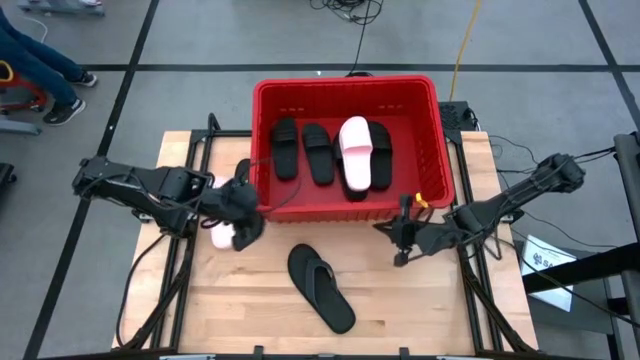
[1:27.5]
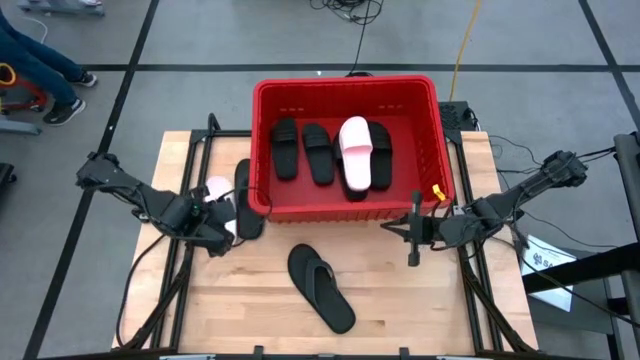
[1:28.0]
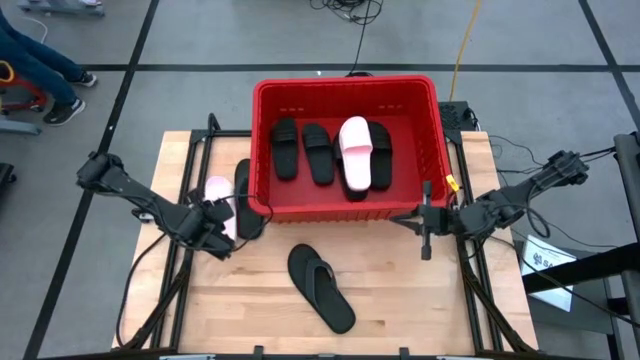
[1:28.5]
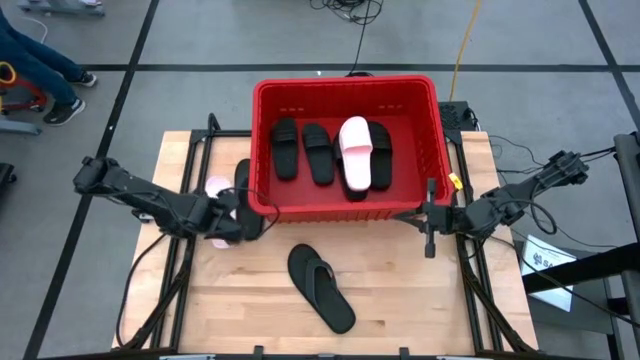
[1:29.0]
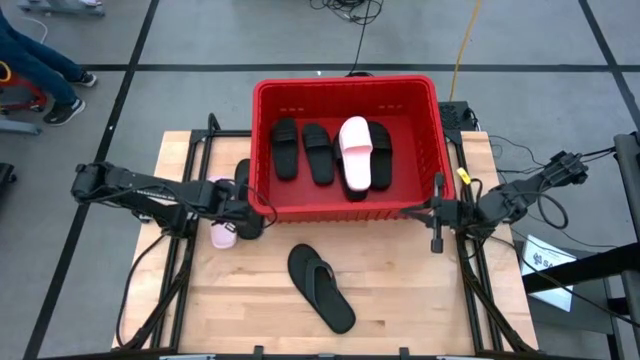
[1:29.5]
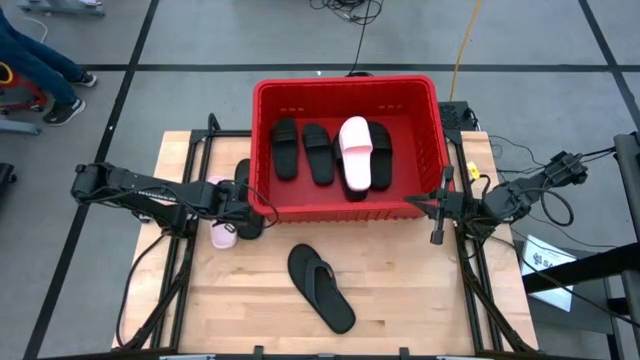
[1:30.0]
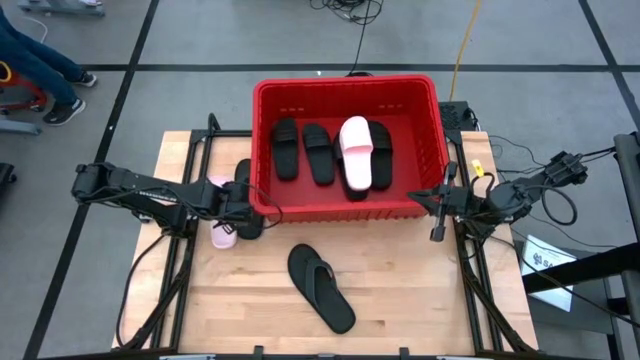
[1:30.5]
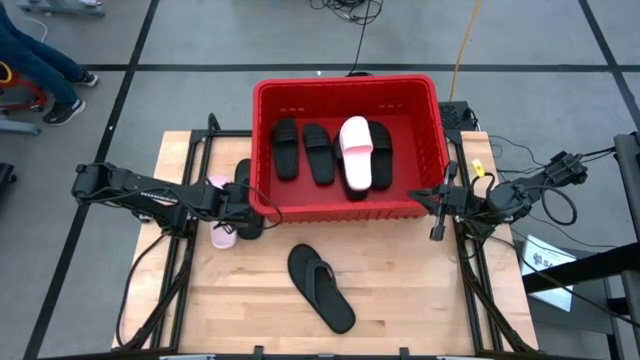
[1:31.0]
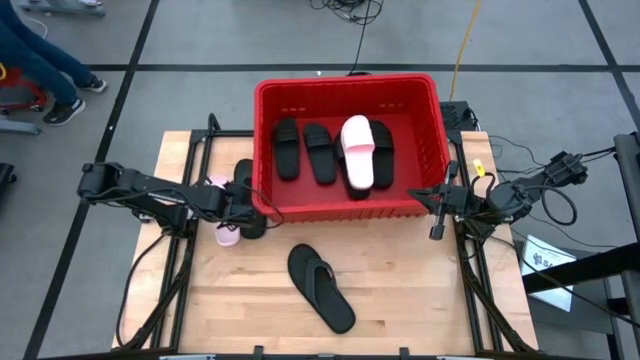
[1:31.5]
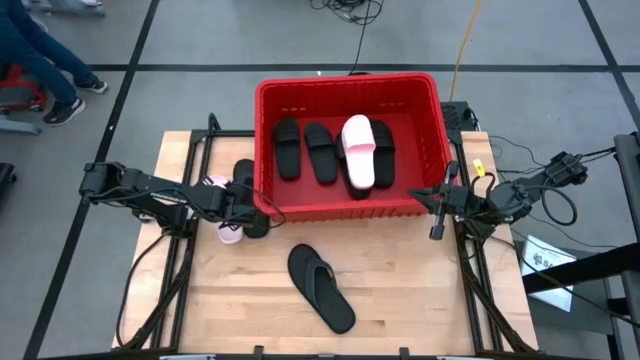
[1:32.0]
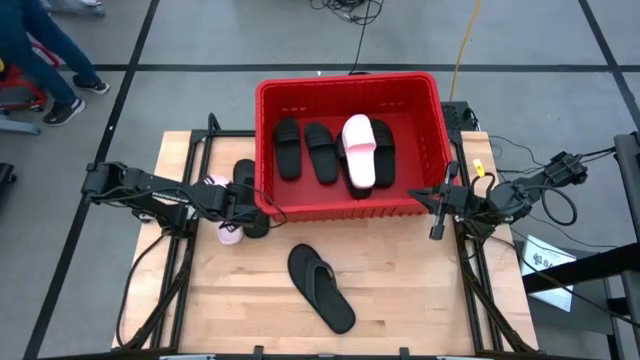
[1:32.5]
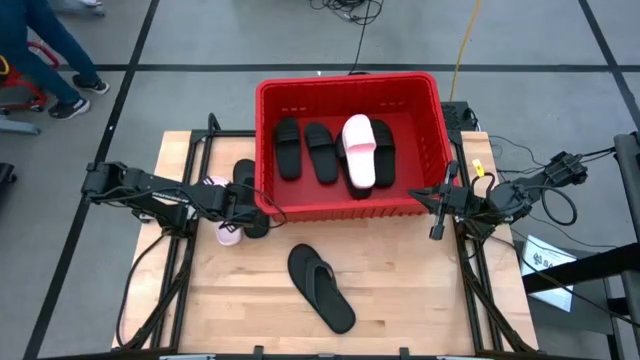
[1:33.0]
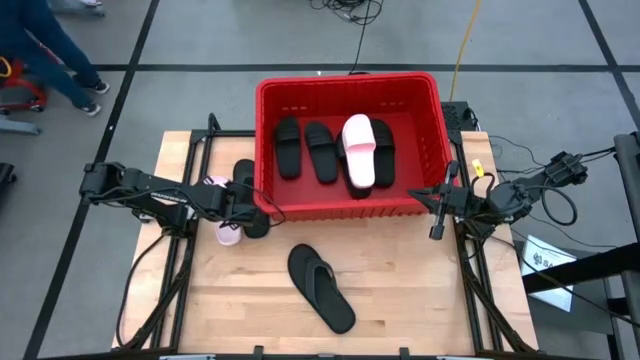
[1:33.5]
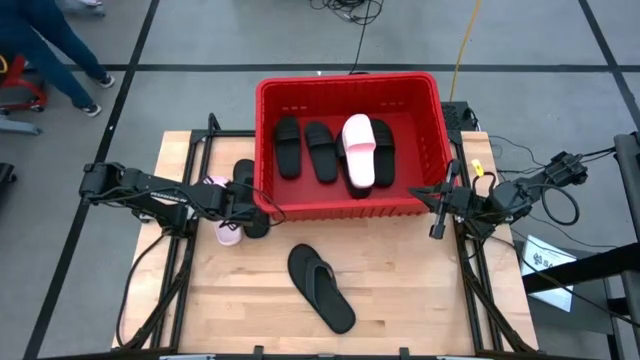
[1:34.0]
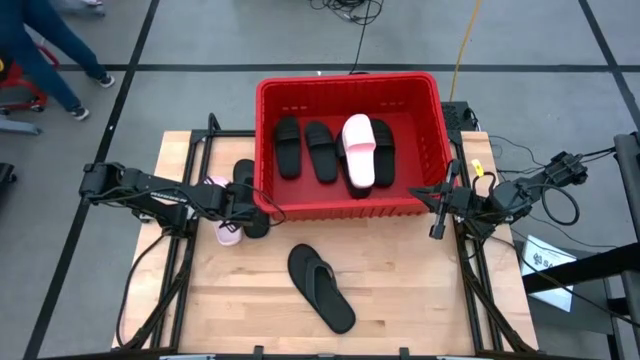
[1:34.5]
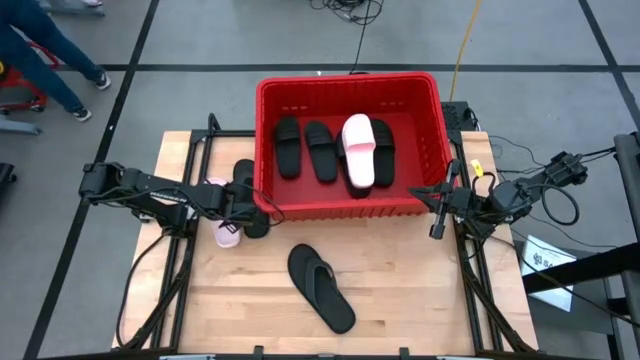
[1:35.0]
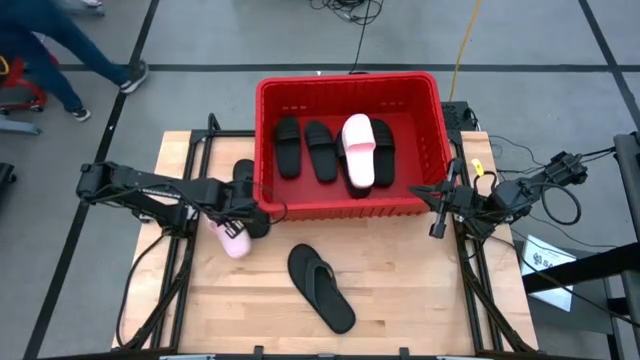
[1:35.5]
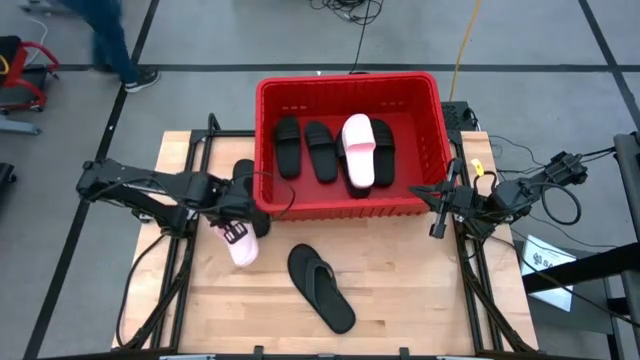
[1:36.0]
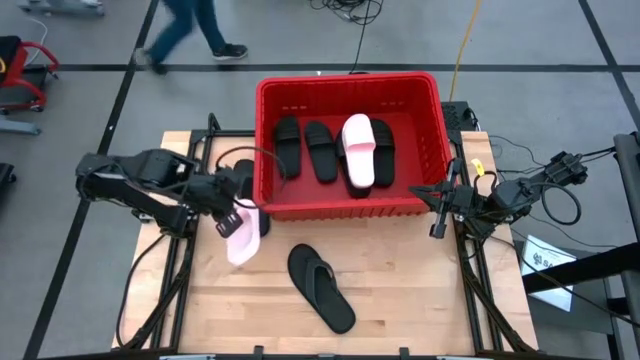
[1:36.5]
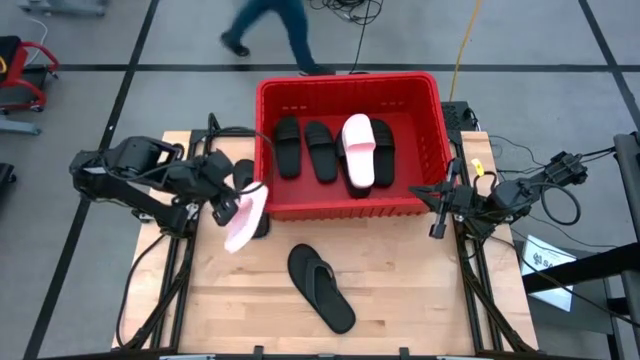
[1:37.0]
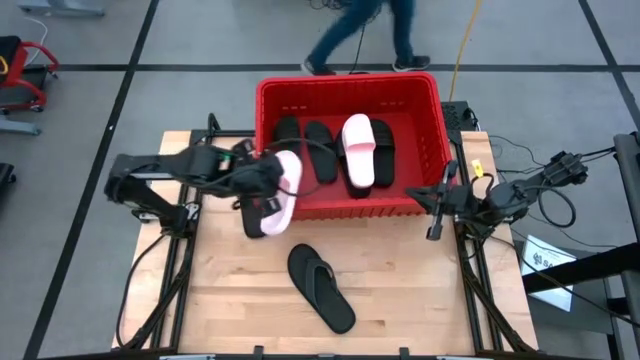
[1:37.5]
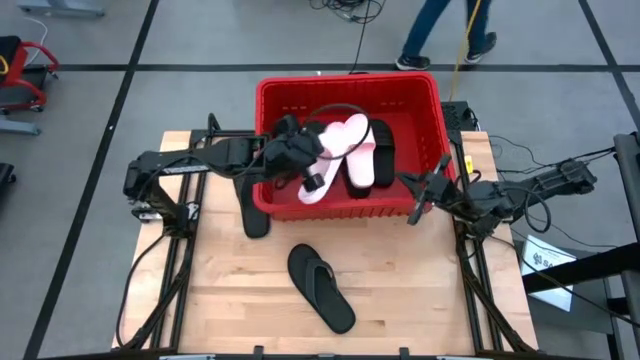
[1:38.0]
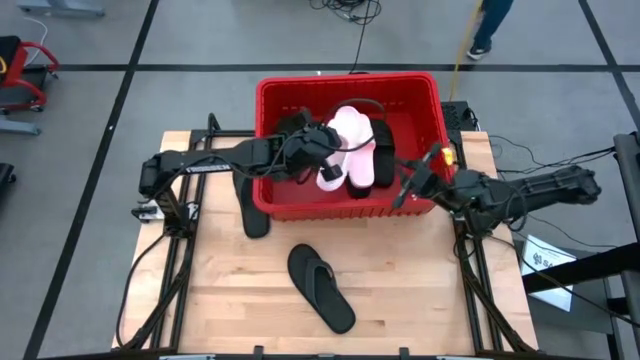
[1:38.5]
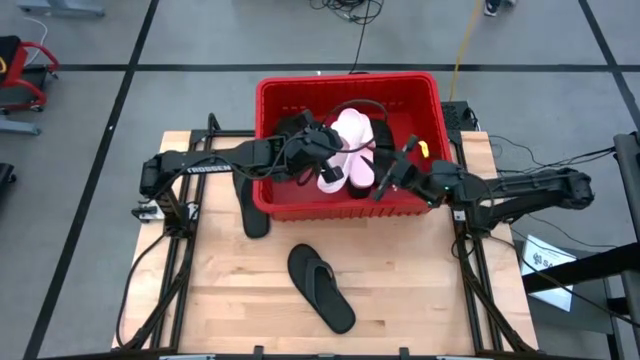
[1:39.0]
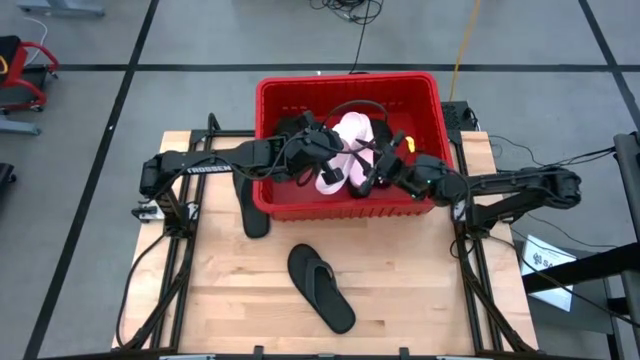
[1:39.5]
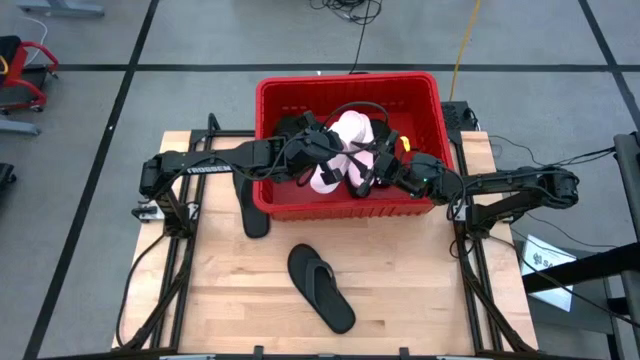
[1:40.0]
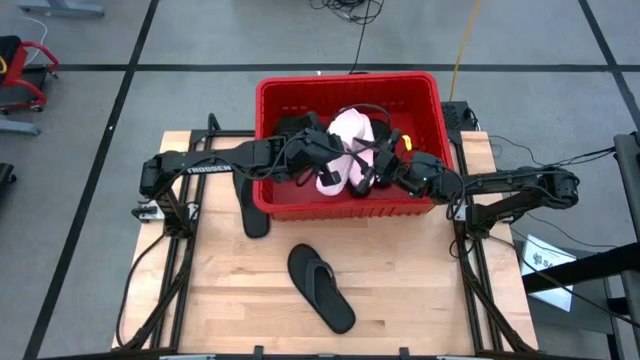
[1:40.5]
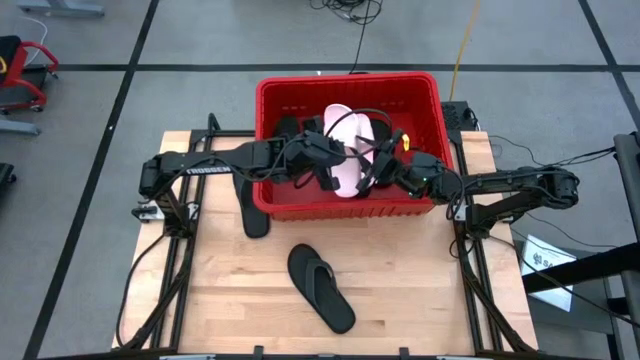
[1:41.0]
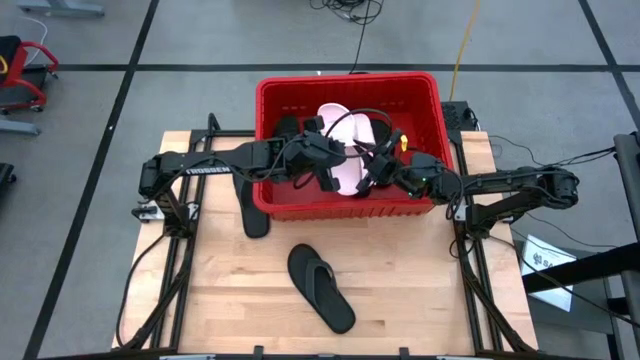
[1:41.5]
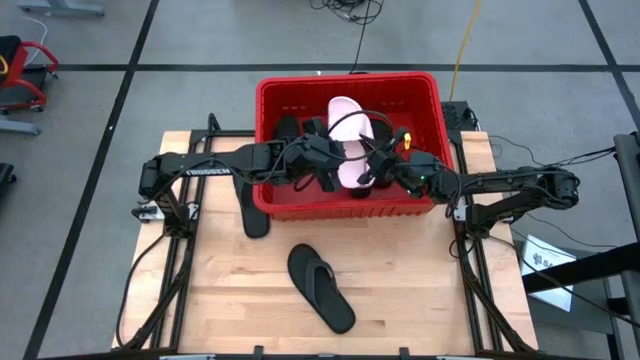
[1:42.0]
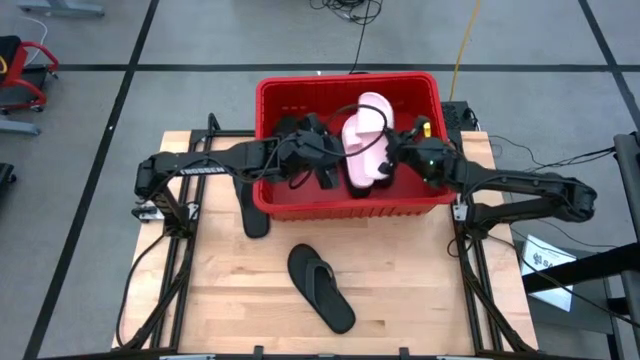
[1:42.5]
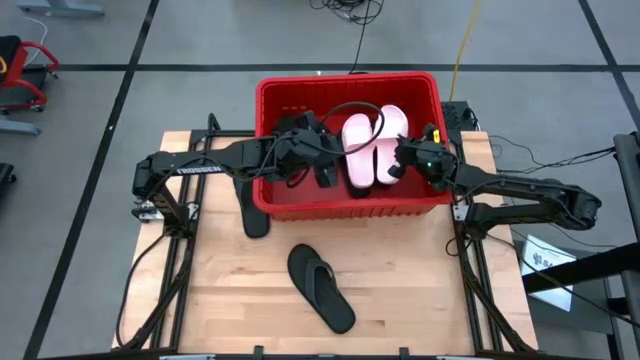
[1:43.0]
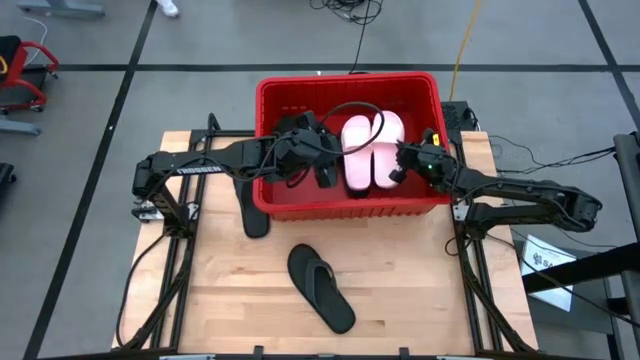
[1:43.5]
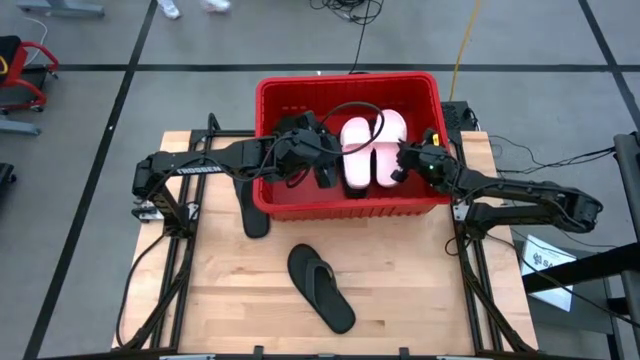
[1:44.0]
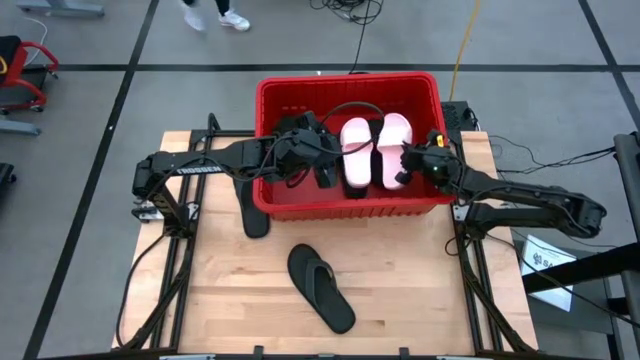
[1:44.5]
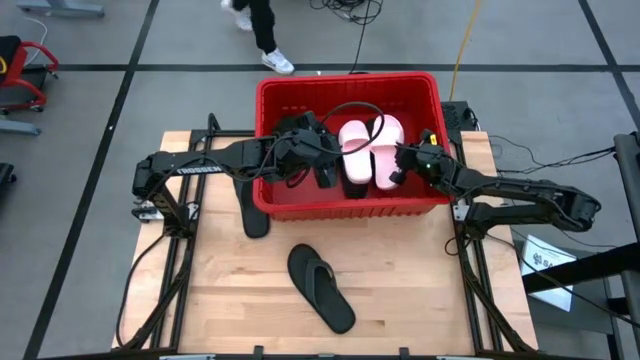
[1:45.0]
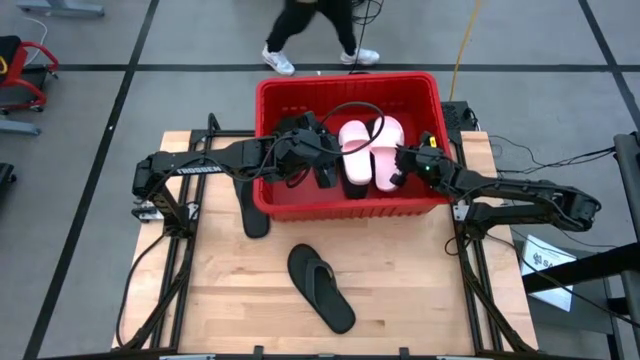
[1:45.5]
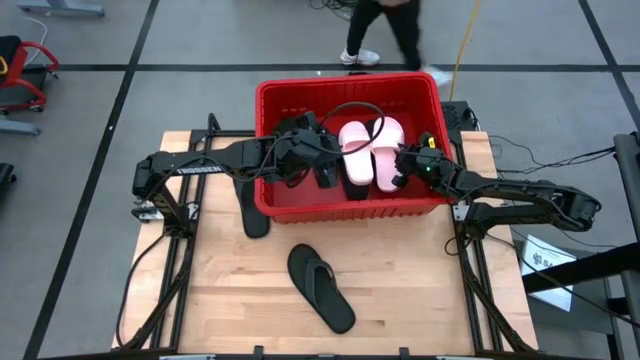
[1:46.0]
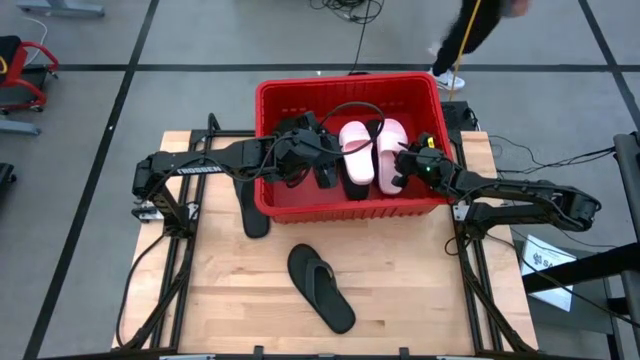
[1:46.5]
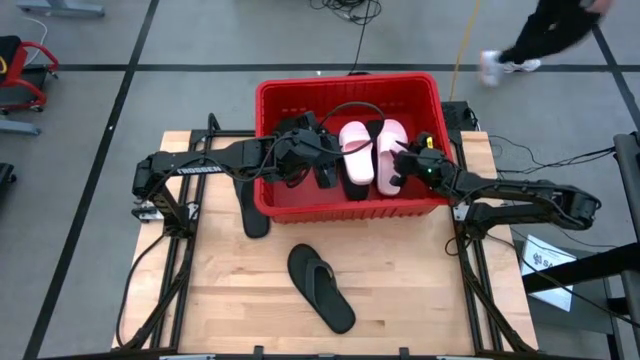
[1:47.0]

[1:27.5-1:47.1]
Task: Pick and place slides into bin
Stack the pink slide on top of the black slide in the red bin

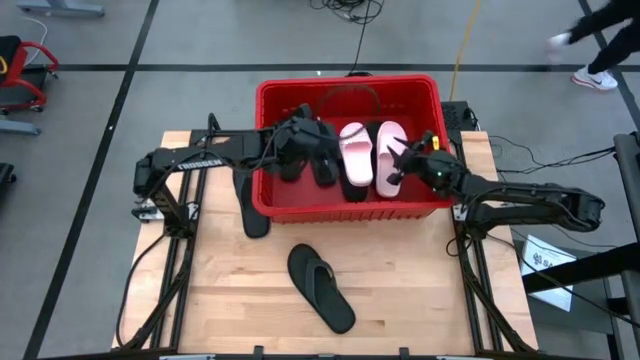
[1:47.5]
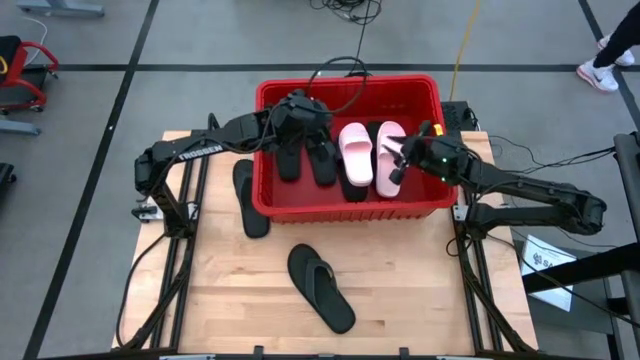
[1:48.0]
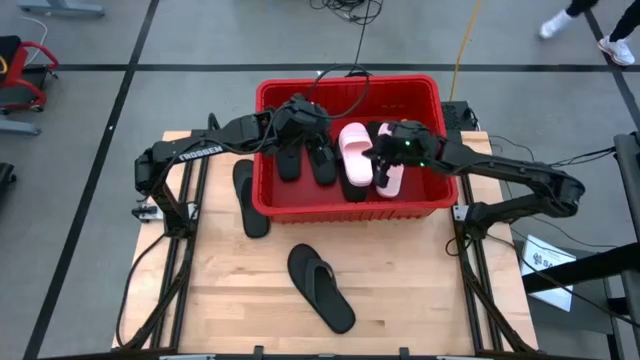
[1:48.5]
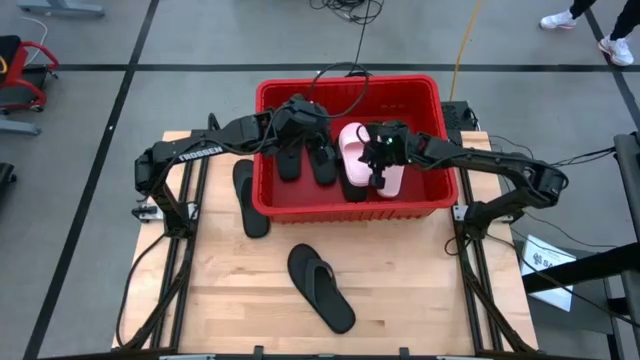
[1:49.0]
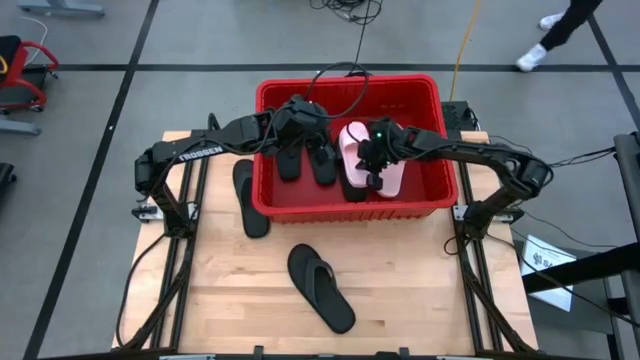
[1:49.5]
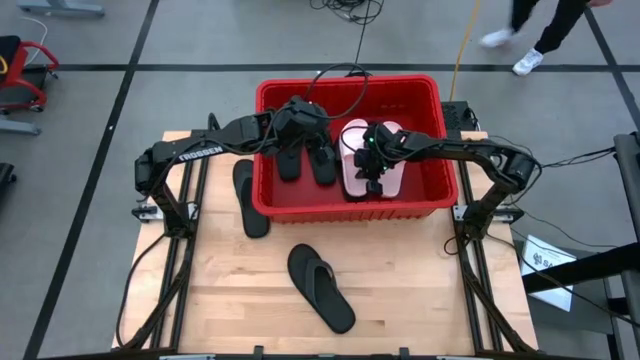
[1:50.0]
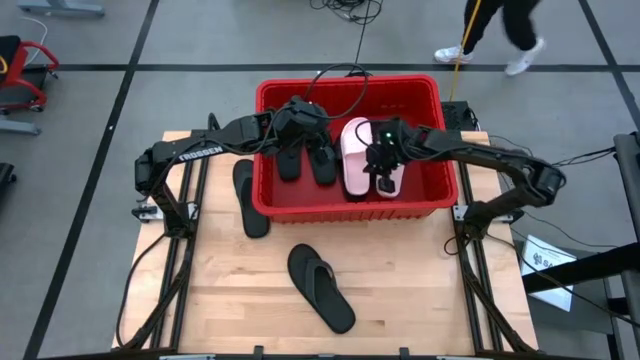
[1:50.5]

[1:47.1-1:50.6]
Adjust the left pink slide in the bin
